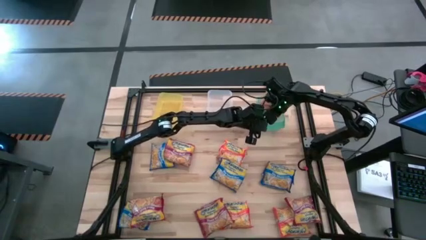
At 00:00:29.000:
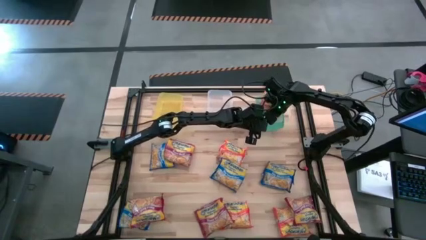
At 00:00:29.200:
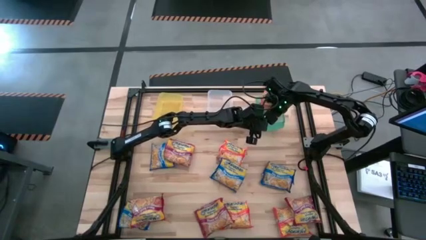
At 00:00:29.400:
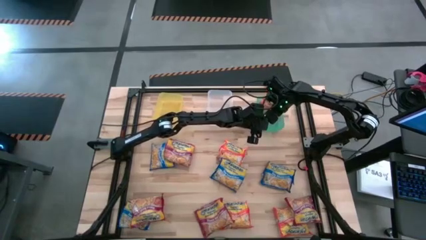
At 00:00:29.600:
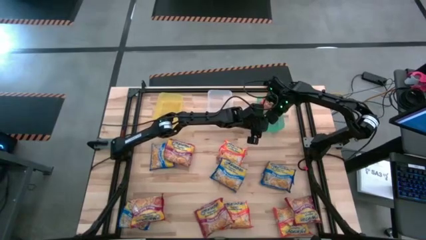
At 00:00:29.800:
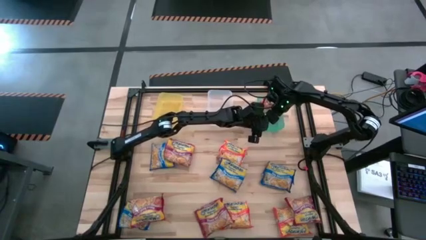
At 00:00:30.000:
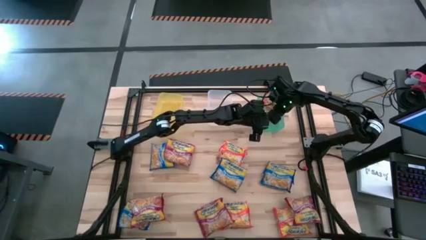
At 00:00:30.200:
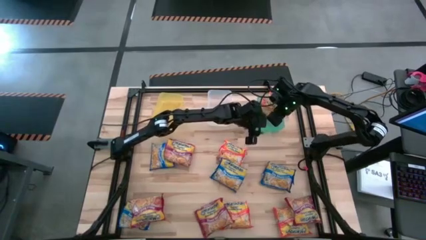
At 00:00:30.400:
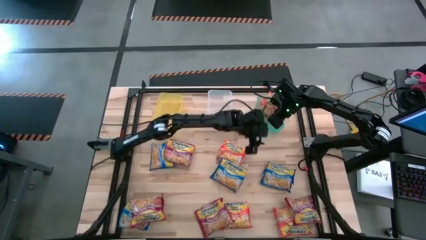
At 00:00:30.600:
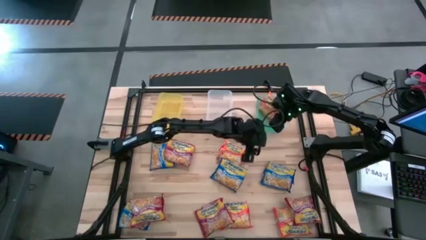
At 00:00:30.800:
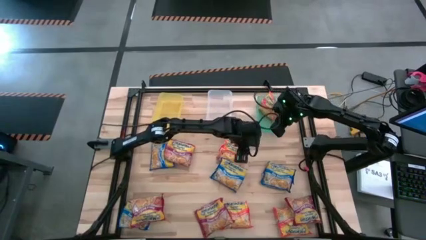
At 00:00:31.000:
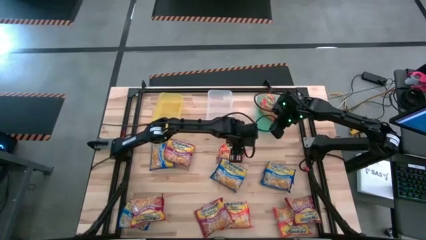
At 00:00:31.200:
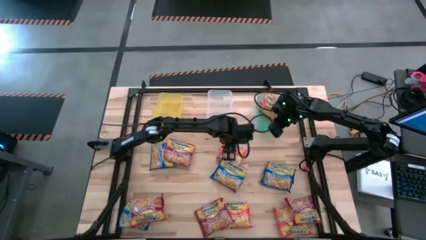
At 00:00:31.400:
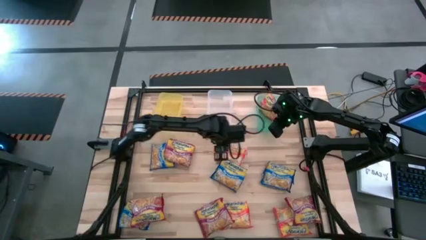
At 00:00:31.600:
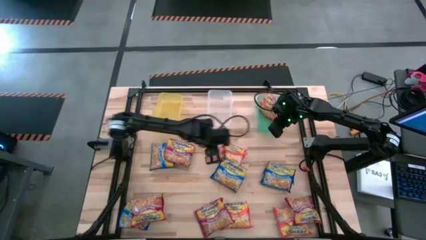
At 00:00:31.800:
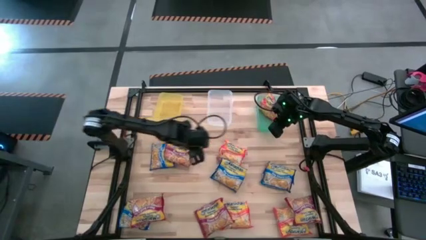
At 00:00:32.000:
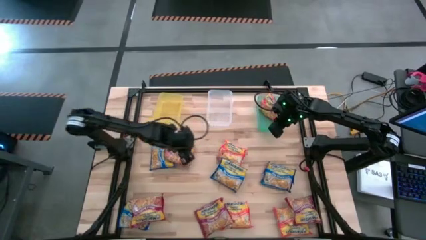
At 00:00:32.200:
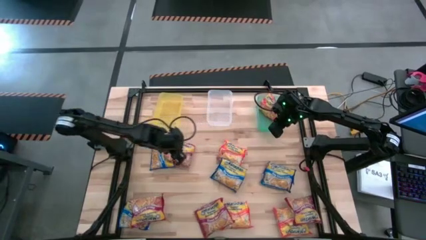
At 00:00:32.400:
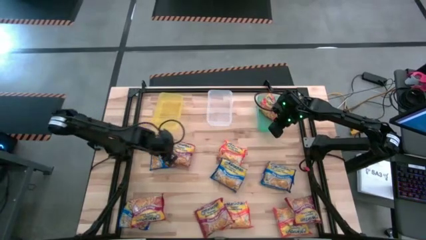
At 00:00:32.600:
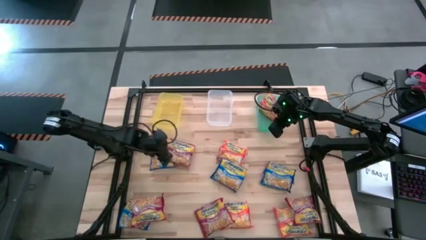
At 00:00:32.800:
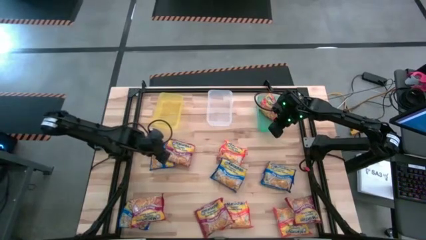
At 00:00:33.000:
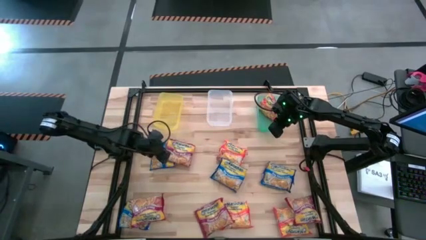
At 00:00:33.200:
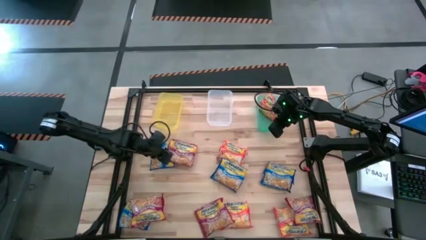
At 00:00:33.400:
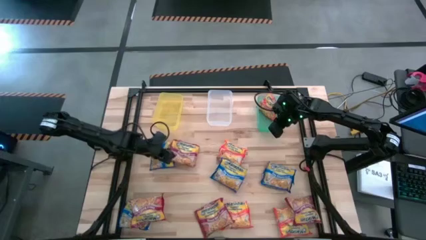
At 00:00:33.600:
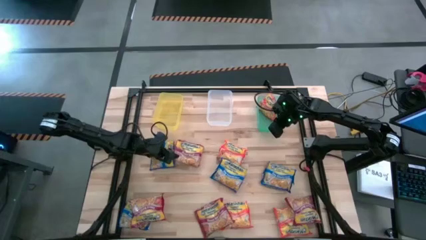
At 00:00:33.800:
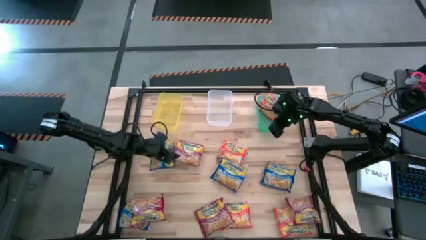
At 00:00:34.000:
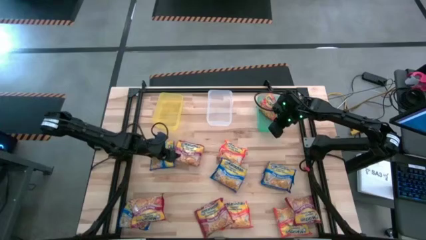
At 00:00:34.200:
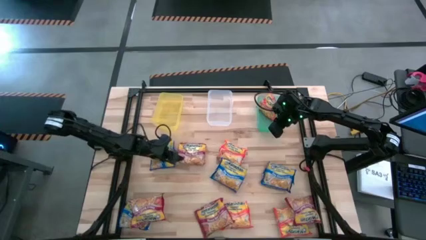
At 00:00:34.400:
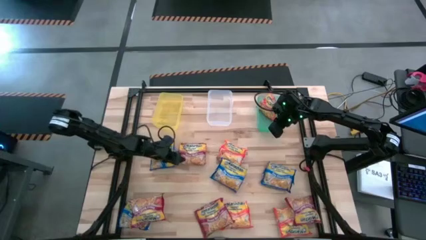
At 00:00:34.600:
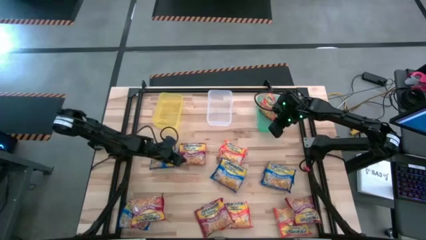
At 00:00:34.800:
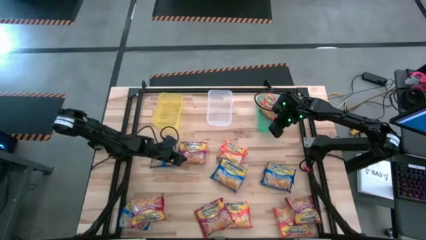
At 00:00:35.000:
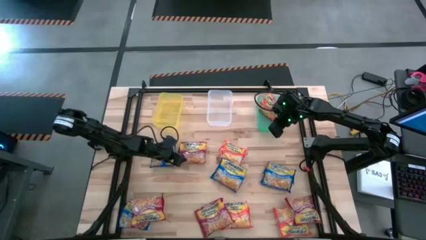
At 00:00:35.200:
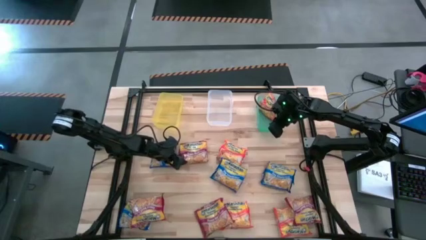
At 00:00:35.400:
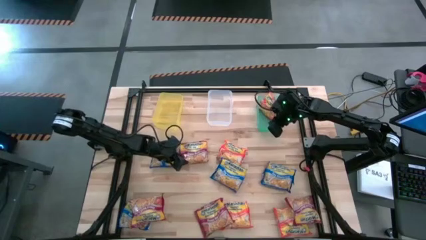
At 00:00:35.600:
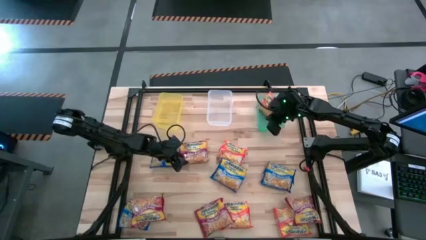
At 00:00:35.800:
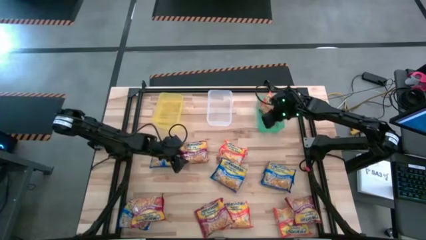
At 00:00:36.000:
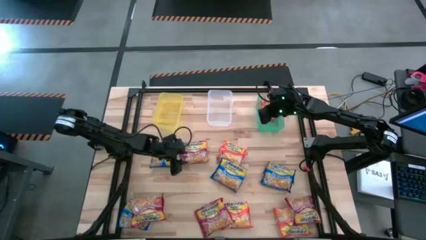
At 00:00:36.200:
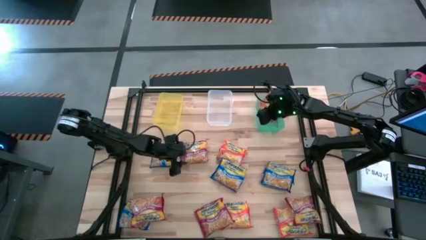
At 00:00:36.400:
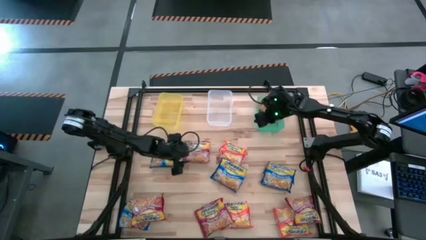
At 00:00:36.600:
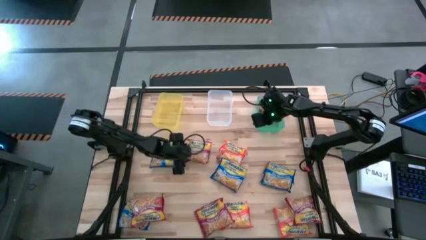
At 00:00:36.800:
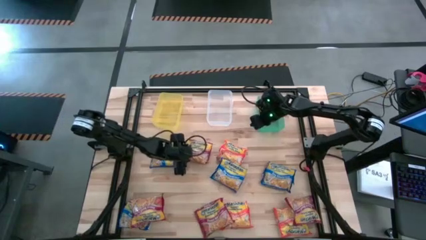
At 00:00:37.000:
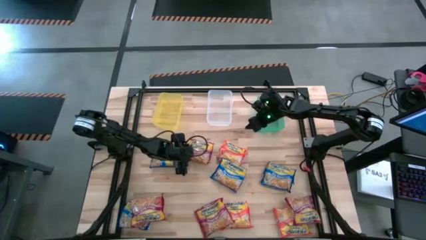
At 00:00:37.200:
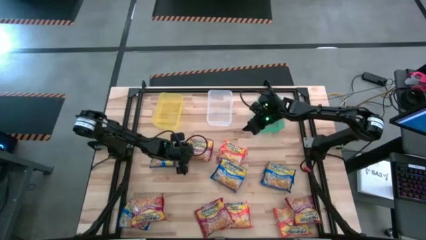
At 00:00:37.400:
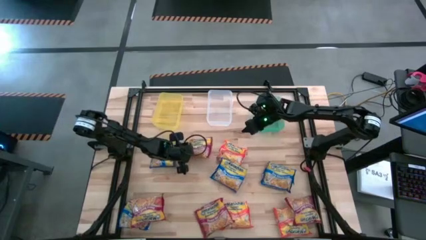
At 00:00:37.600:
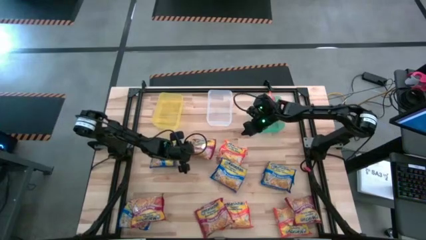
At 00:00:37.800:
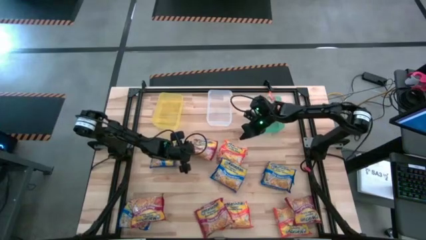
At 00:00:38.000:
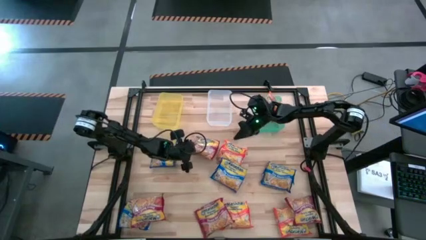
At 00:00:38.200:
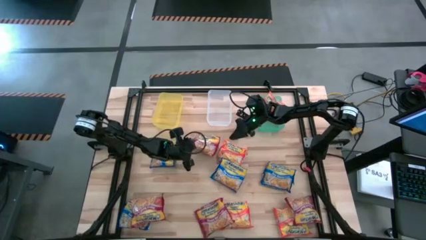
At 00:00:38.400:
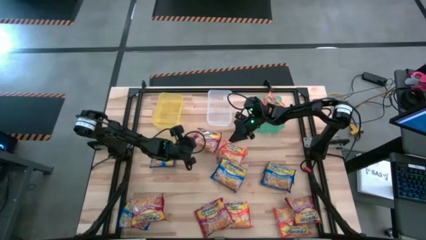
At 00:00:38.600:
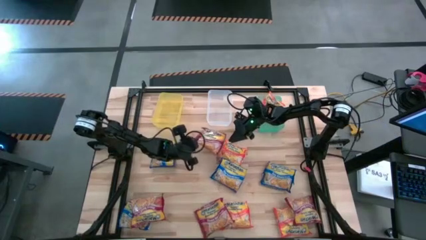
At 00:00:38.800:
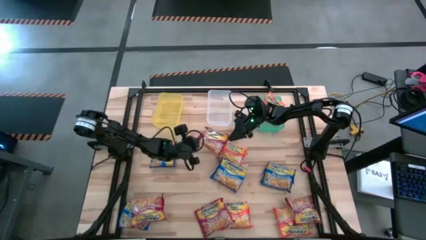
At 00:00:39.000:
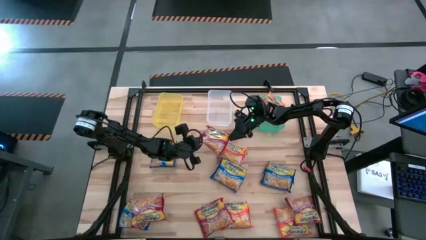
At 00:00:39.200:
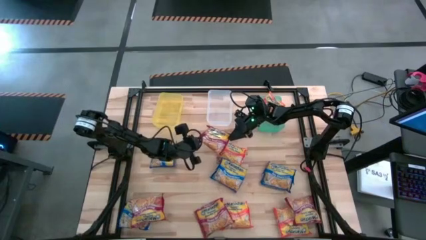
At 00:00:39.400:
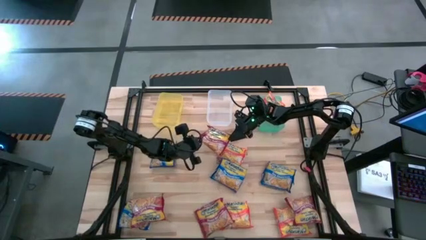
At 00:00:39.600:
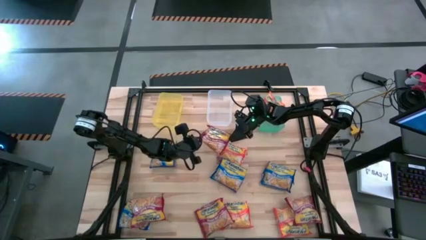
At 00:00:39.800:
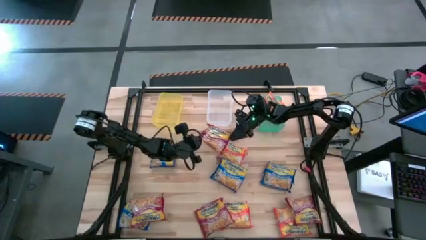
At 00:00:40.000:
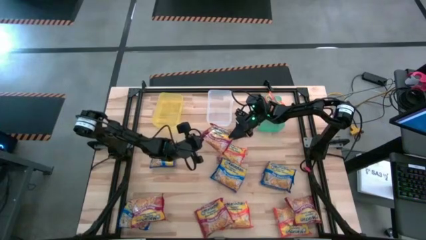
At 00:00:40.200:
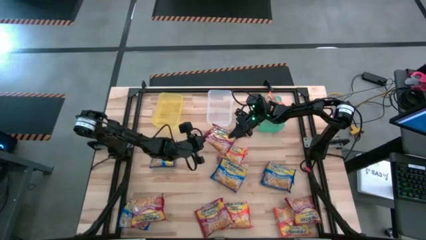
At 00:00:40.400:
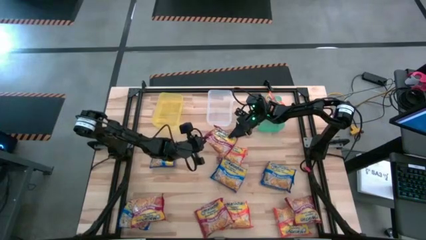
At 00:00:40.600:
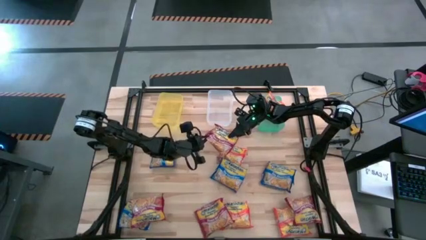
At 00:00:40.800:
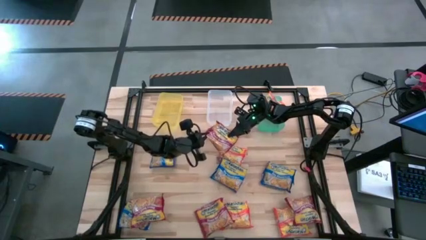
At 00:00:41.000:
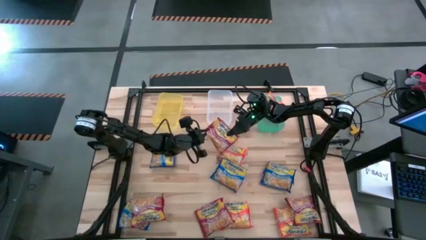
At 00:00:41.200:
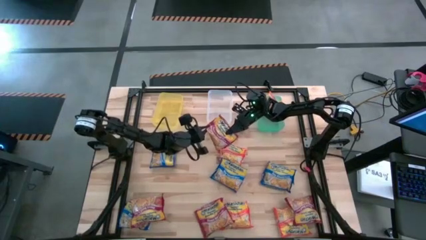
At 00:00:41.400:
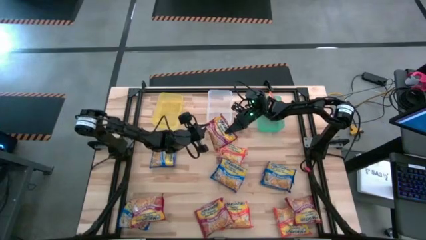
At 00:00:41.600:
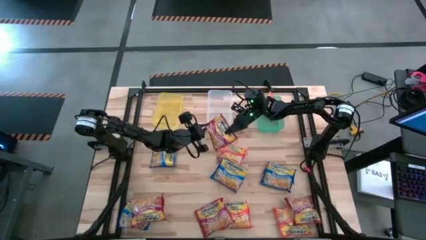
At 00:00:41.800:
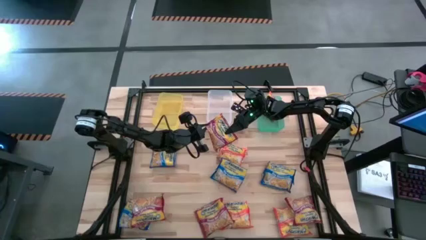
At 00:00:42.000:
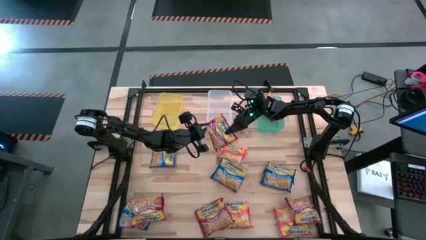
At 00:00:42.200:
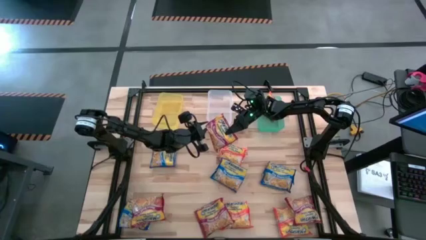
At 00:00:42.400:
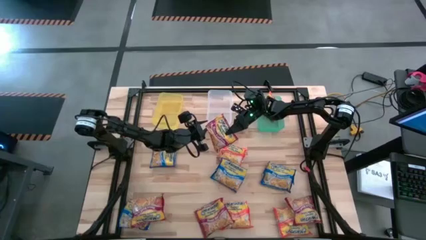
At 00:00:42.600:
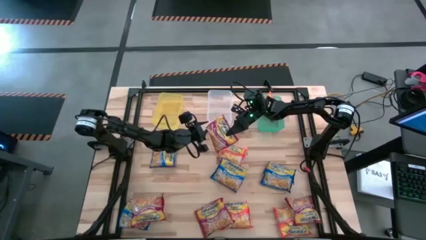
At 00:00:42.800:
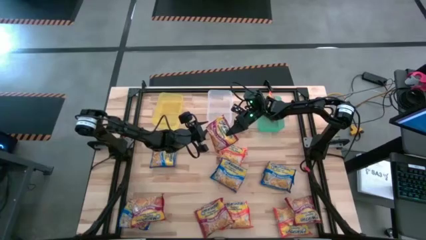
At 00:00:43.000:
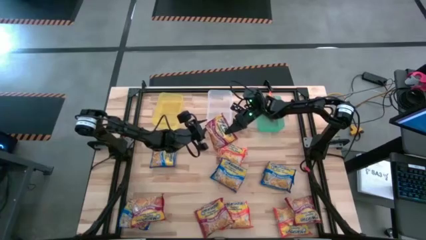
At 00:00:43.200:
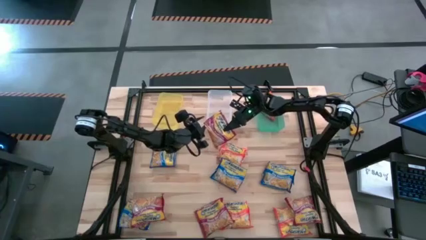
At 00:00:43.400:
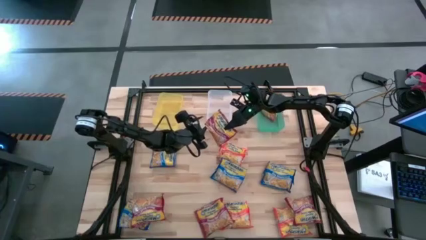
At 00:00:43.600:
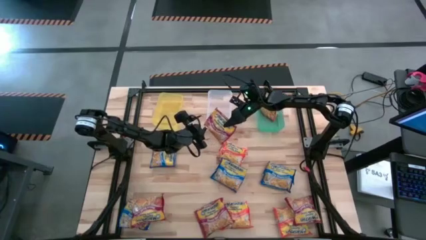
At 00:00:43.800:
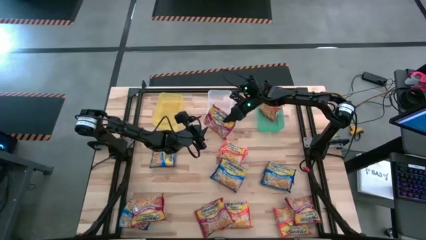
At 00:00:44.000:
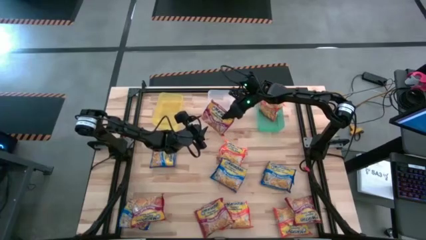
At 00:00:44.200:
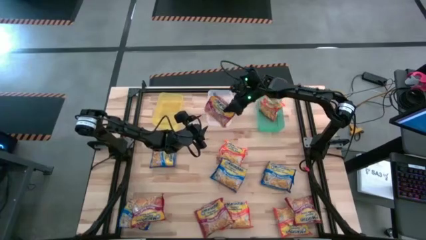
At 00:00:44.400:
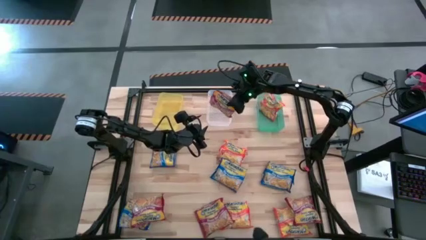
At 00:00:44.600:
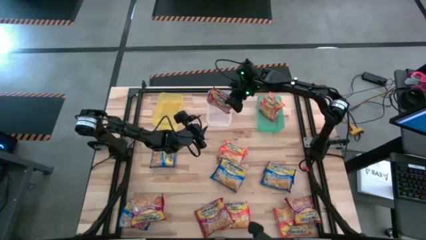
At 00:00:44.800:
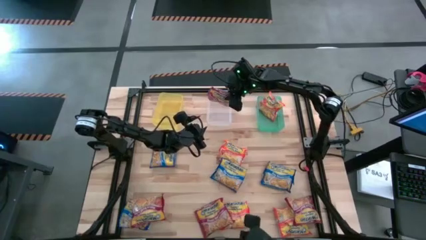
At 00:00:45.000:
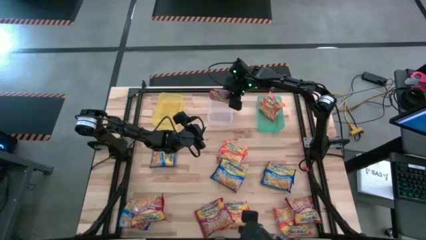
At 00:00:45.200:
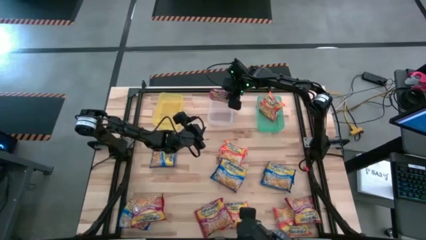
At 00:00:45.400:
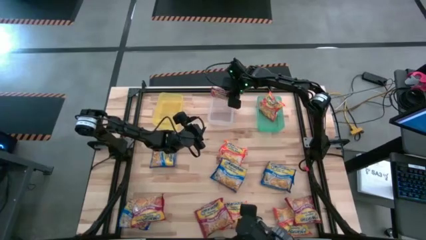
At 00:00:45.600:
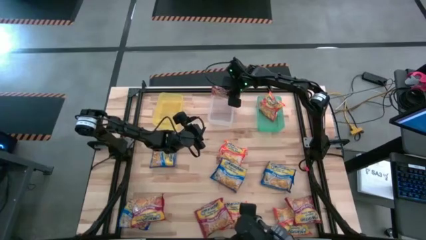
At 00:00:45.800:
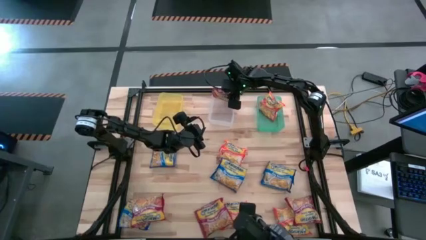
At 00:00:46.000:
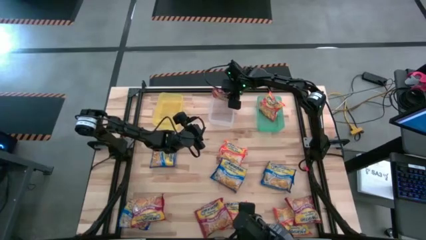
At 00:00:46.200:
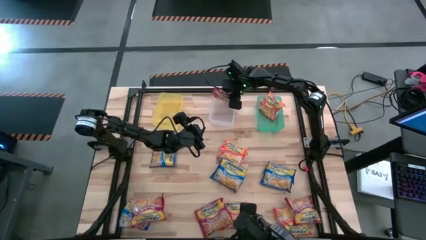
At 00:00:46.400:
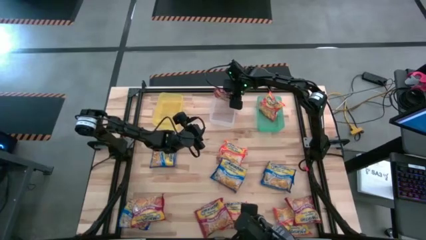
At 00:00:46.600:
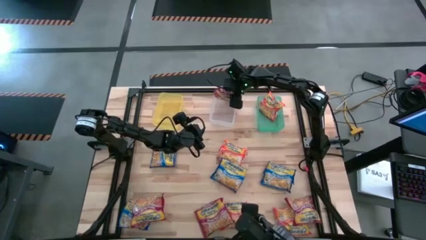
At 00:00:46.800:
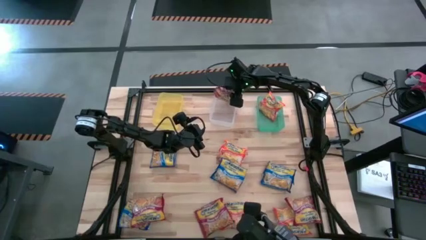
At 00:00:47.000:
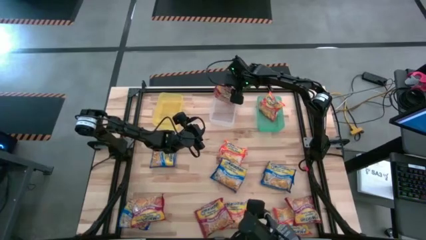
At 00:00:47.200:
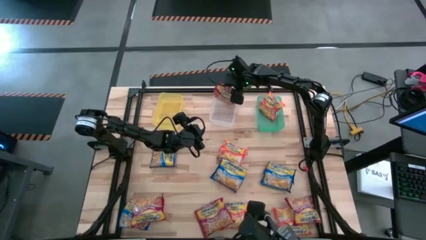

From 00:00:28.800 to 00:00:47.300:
Task: Sort Maruchan noodles
Put the top red noodle pack into the white bin
